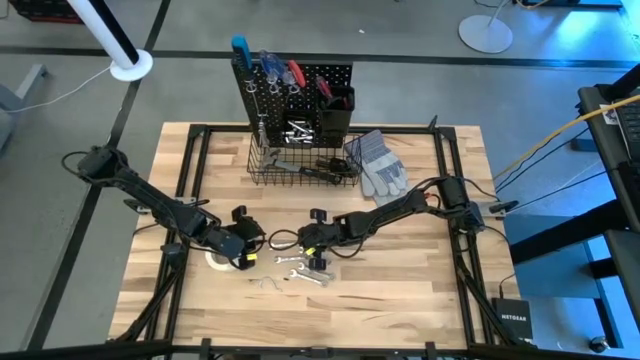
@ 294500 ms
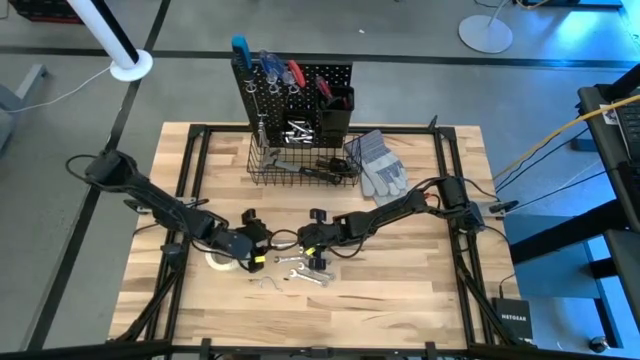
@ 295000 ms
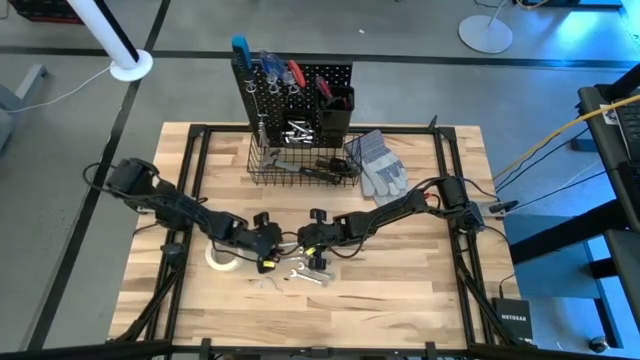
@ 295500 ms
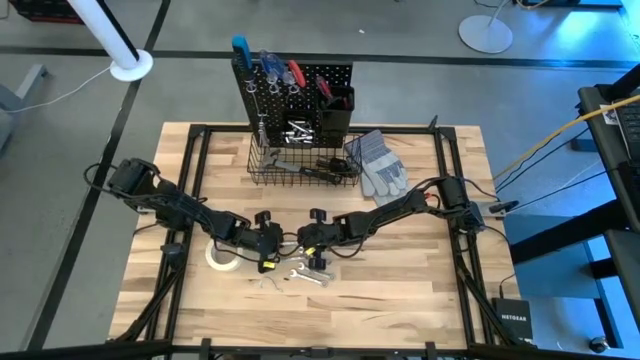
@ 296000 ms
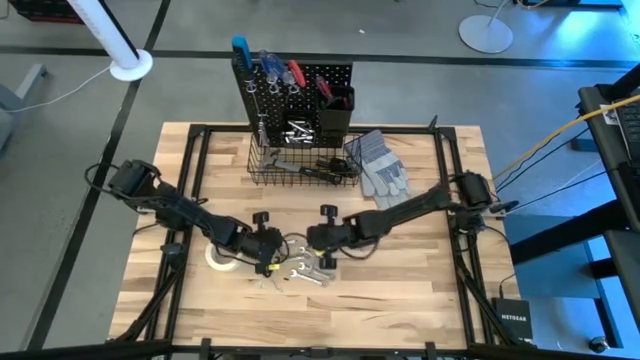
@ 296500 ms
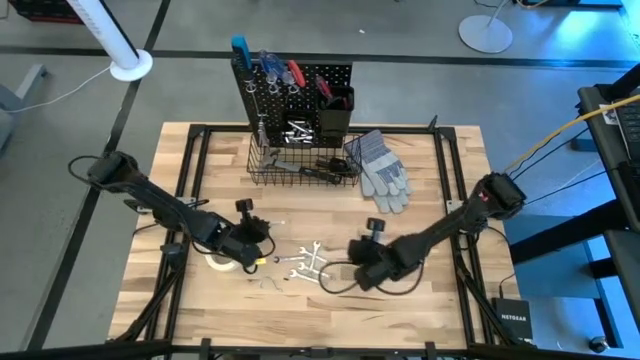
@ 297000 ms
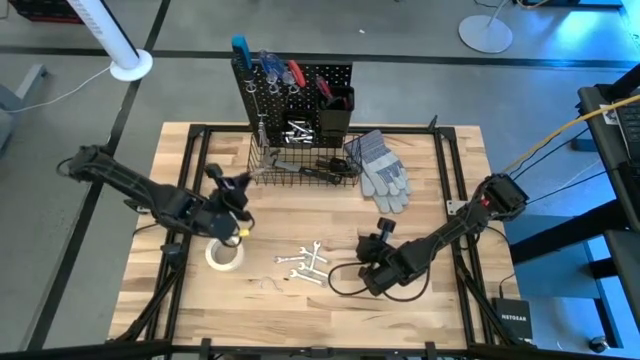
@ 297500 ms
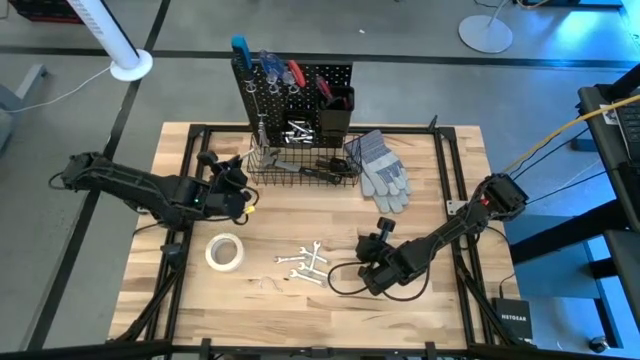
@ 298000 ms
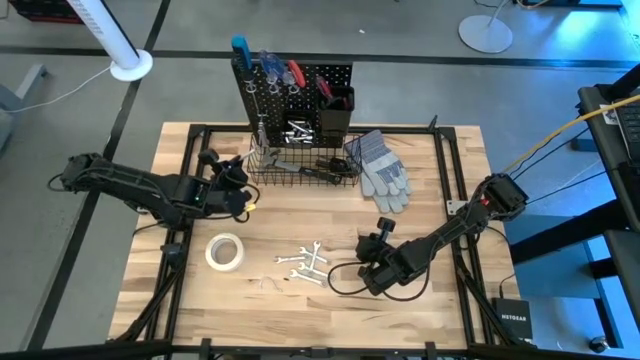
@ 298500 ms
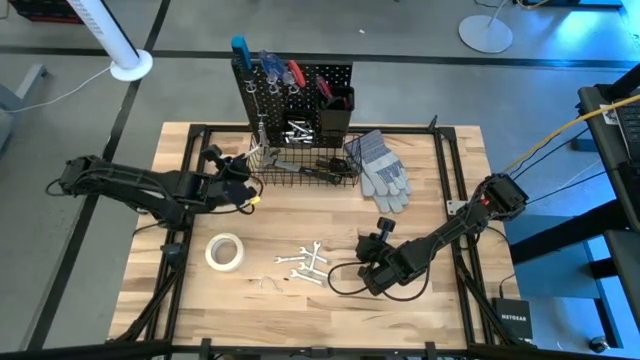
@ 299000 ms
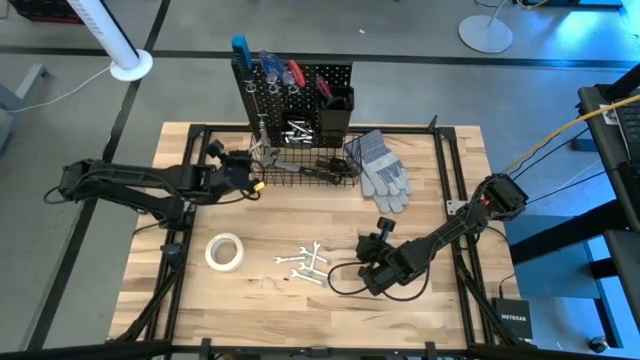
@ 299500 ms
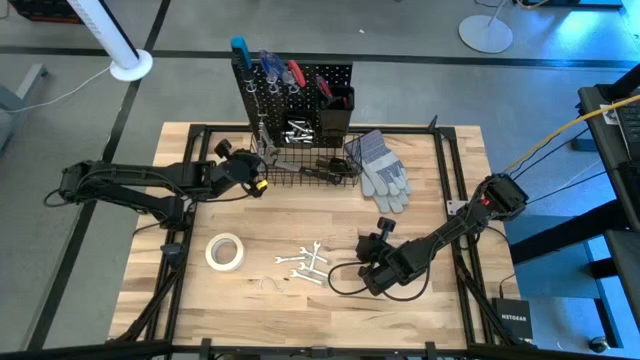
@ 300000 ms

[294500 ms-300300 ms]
Task: Hang tools onto peg board
Hang the wrench on the peg board

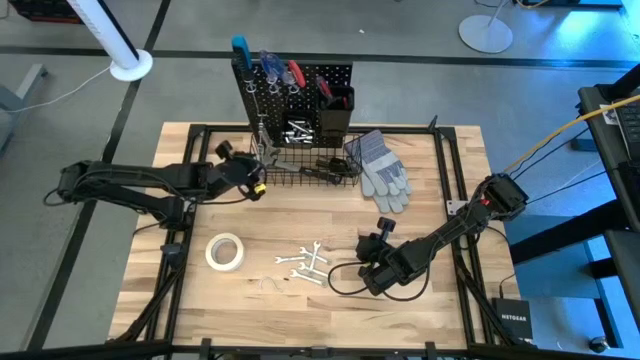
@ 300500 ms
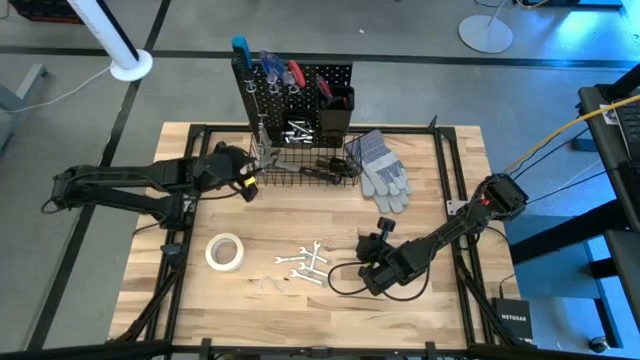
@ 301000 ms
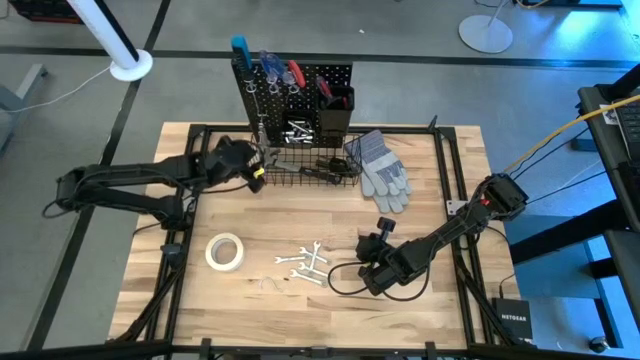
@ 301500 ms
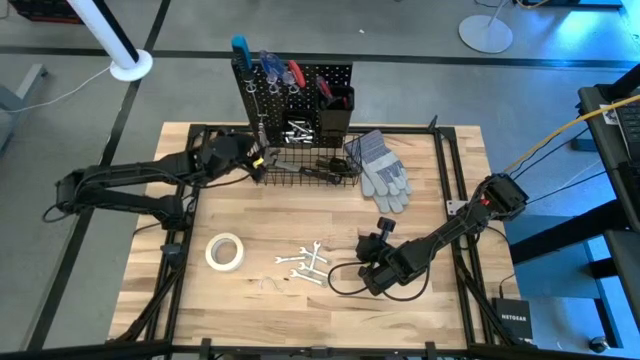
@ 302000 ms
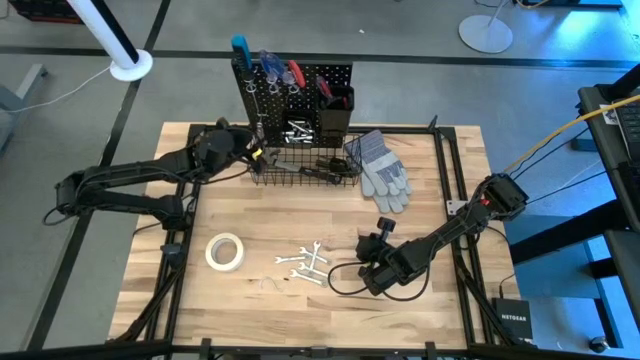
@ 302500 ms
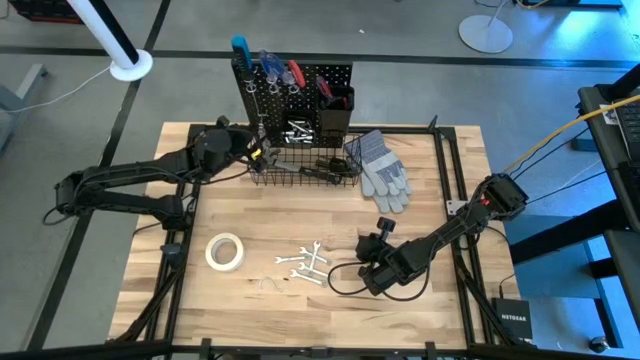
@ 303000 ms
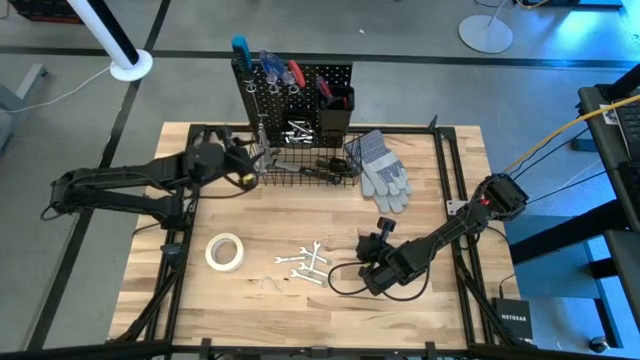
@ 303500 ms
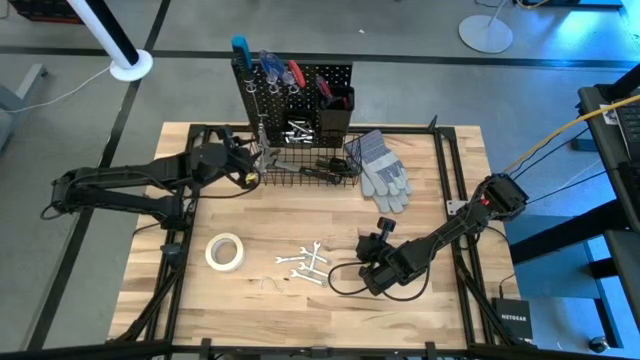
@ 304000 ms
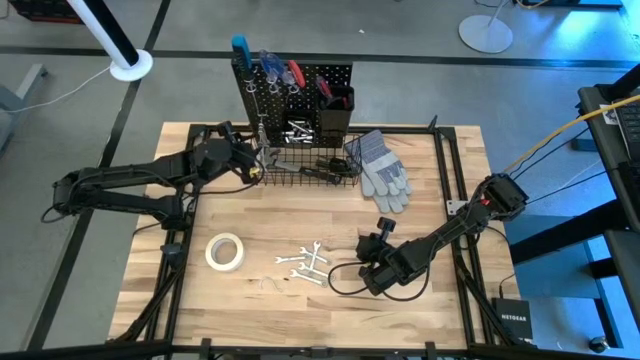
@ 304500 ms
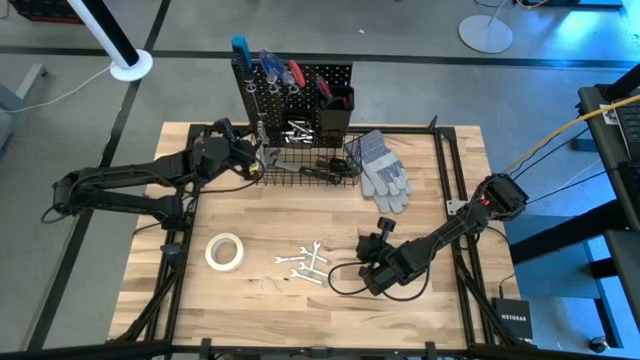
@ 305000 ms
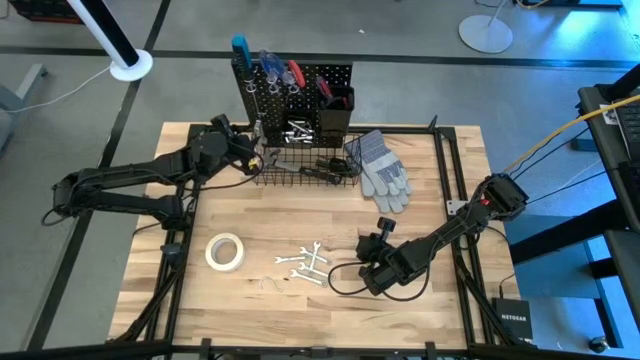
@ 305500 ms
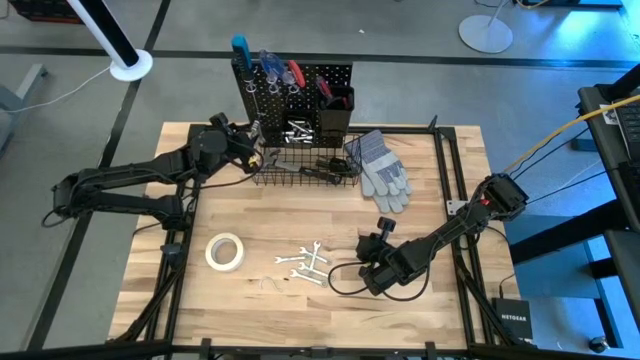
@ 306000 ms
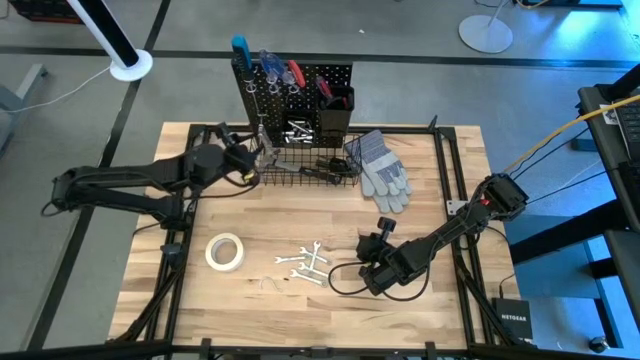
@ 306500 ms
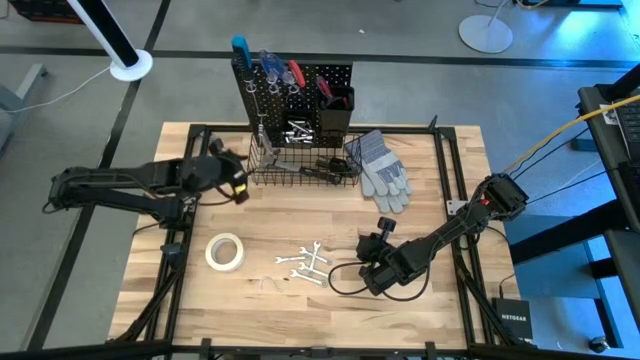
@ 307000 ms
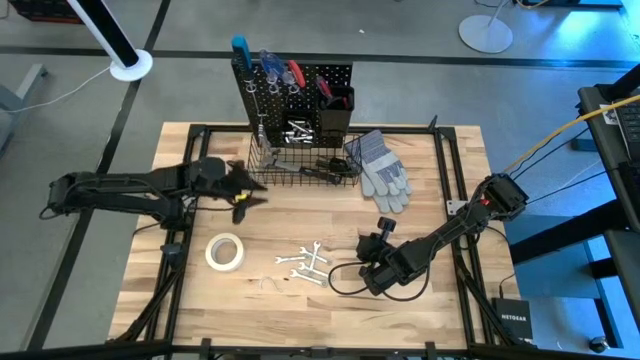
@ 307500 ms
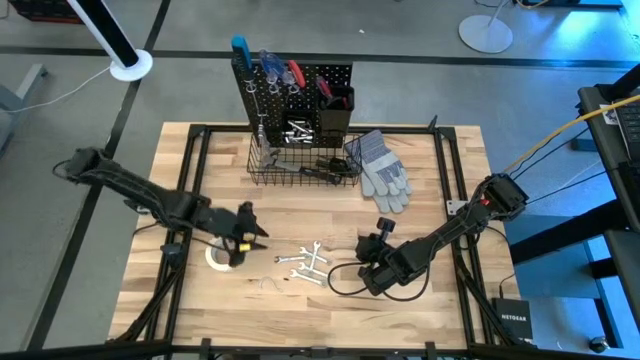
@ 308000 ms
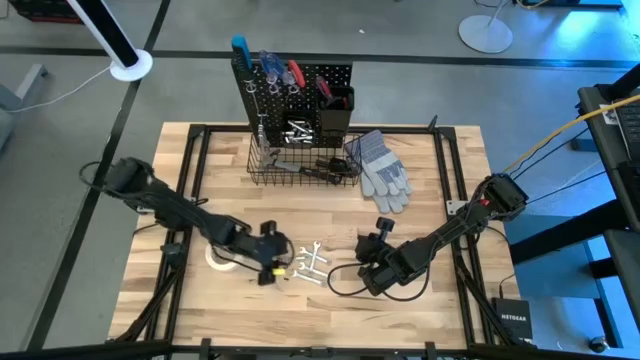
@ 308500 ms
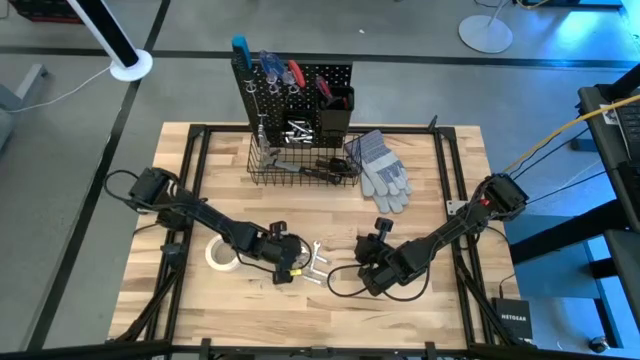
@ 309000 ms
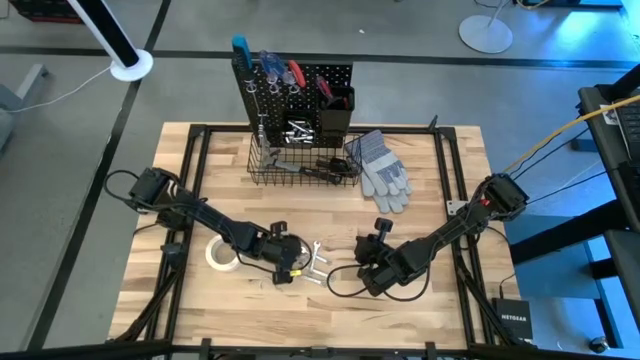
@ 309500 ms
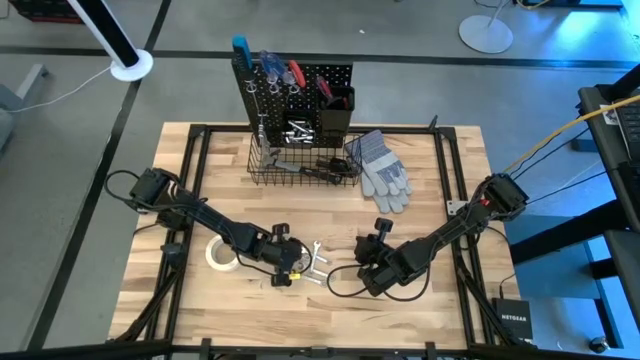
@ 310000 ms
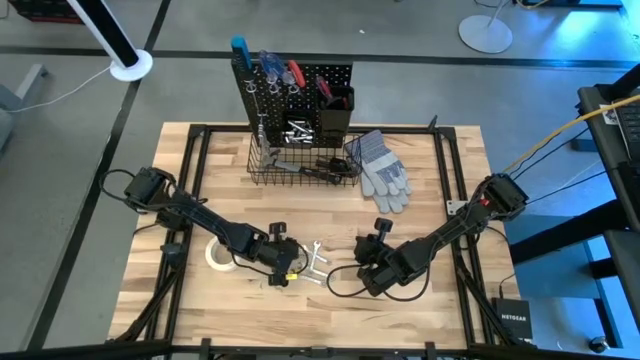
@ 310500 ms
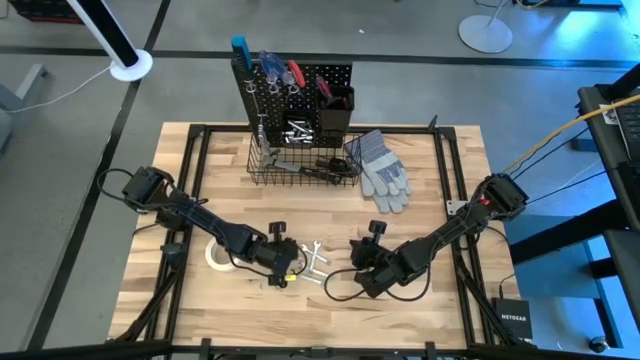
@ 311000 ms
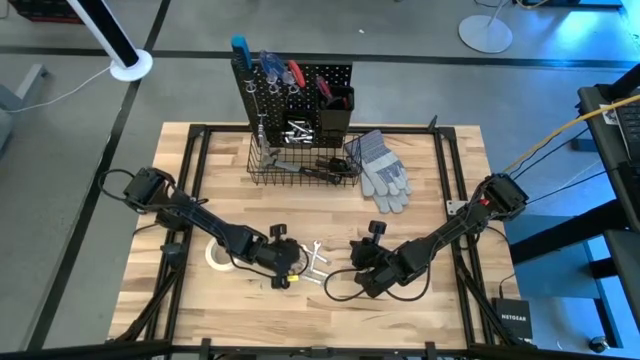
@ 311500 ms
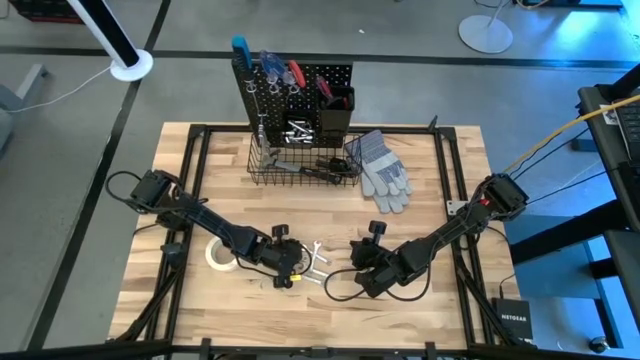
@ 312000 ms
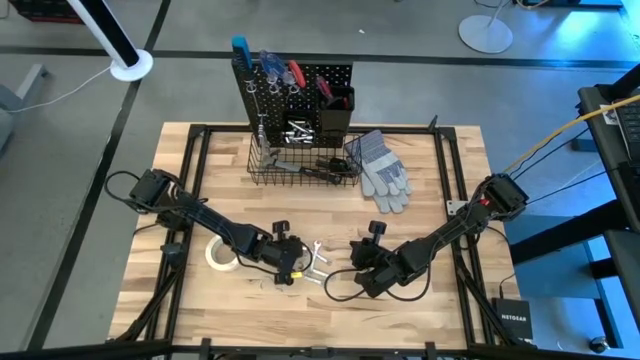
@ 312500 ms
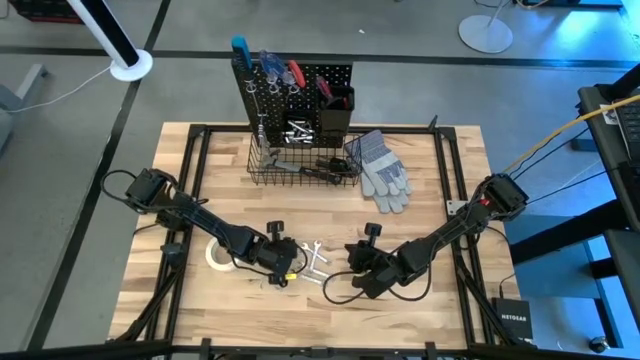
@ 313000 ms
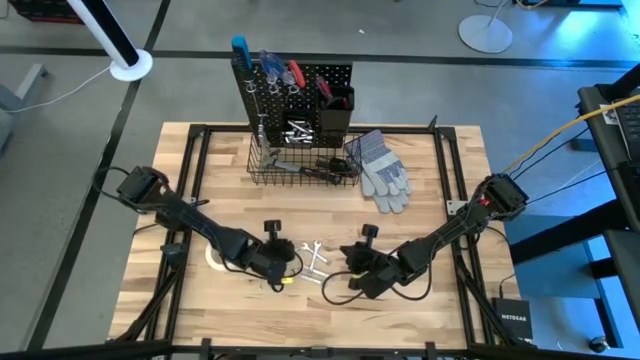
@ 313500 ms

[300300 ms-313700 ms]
Hang the wrench on the peg board

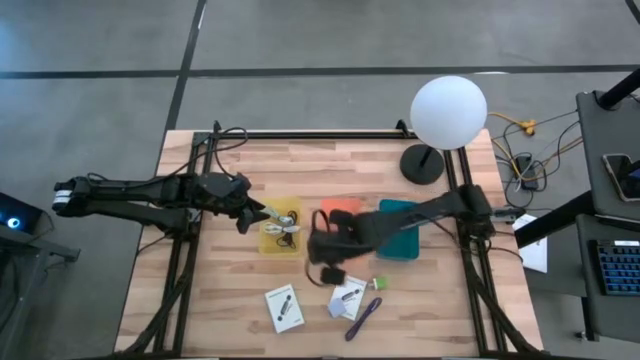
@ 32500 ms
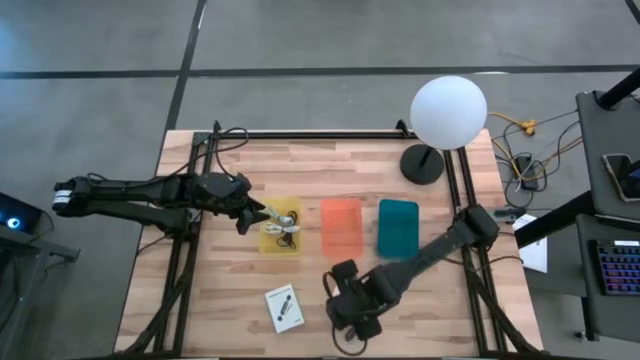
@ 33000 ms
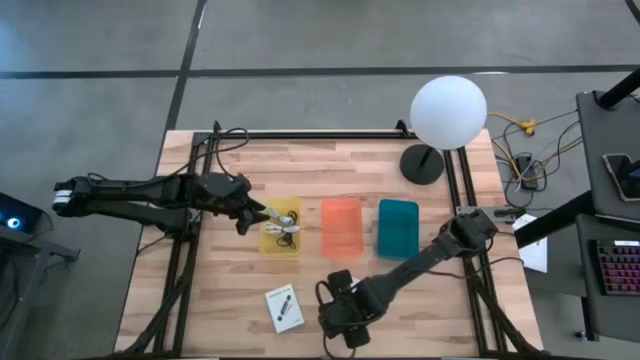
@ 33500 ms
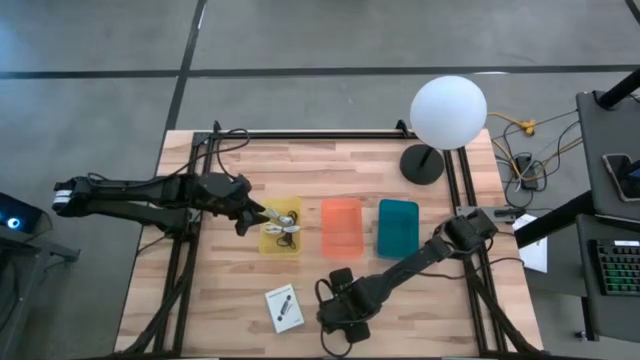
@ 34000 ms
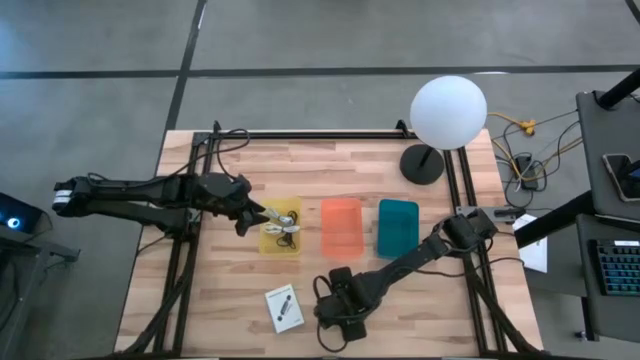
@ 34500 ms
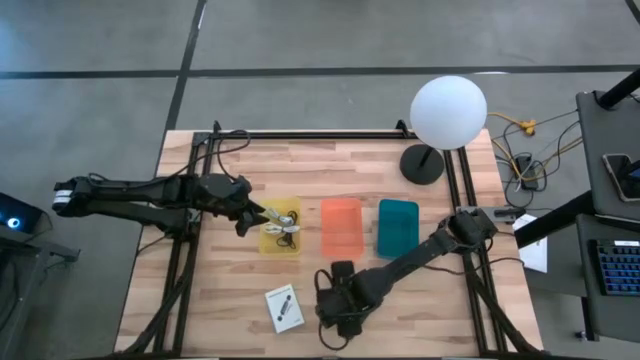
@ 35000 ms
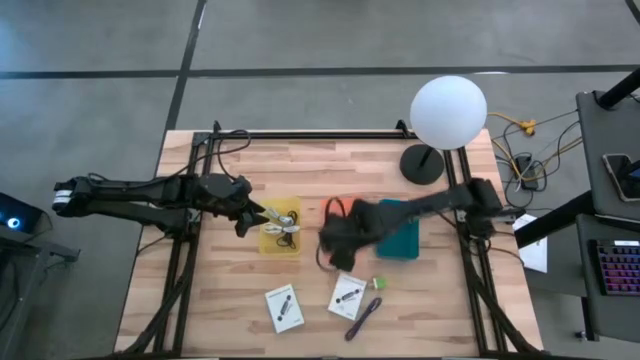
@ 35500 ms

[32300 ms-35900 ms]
Task: Pick and place items into bin
Put the violet USB adapter box into the orange bin
